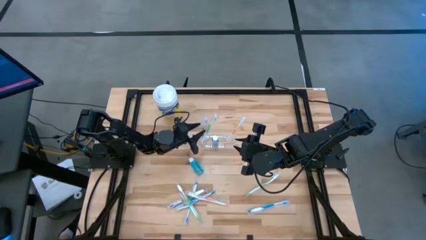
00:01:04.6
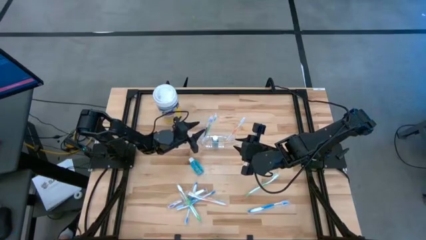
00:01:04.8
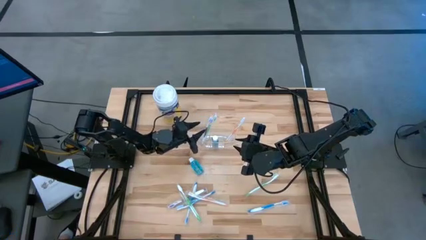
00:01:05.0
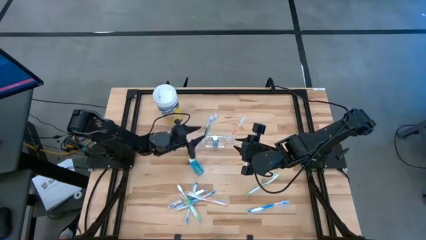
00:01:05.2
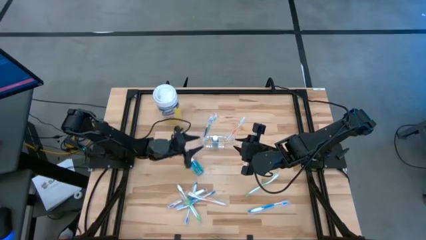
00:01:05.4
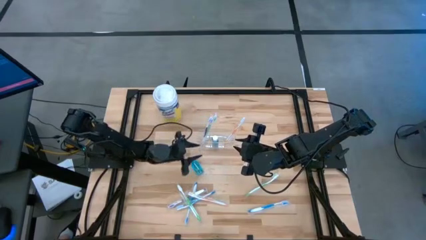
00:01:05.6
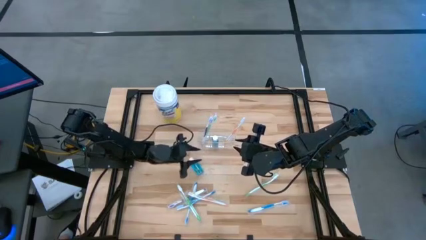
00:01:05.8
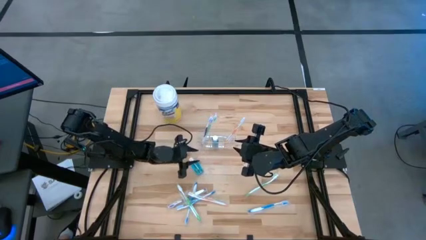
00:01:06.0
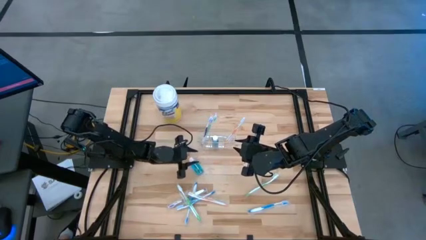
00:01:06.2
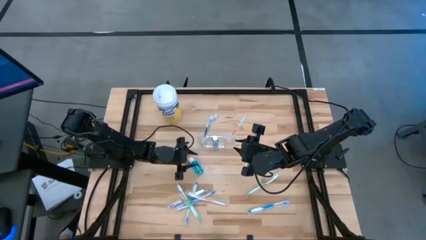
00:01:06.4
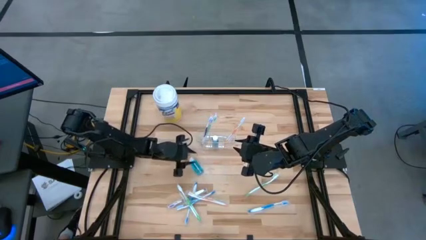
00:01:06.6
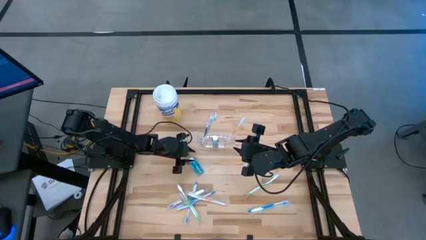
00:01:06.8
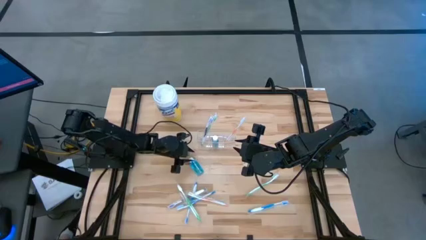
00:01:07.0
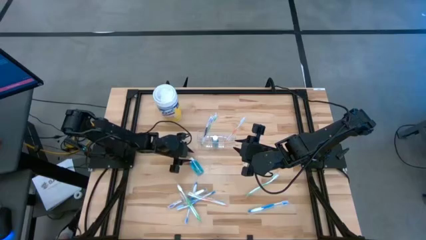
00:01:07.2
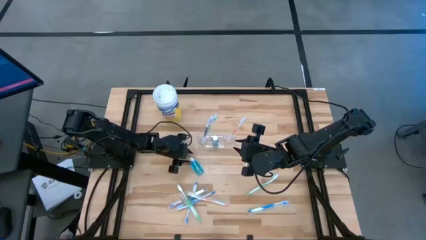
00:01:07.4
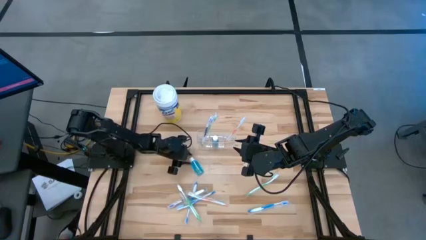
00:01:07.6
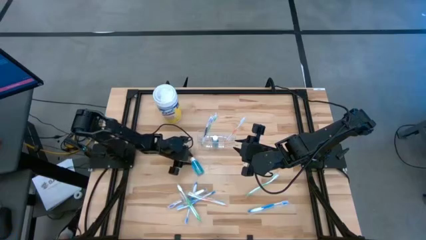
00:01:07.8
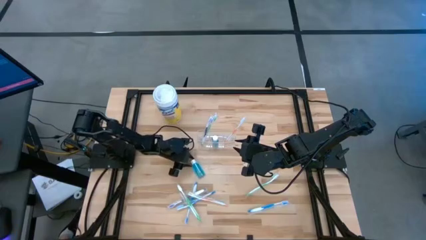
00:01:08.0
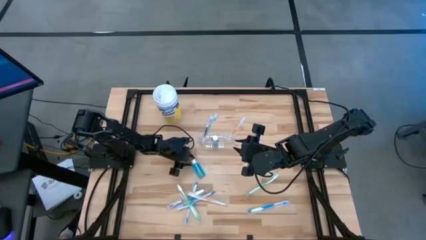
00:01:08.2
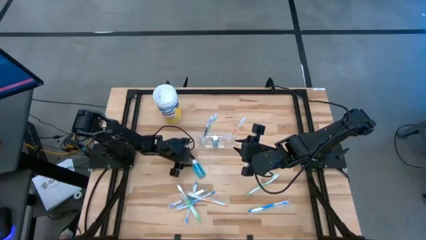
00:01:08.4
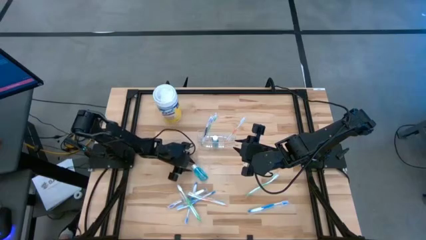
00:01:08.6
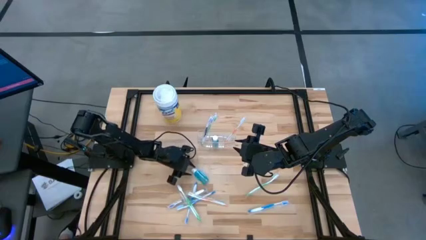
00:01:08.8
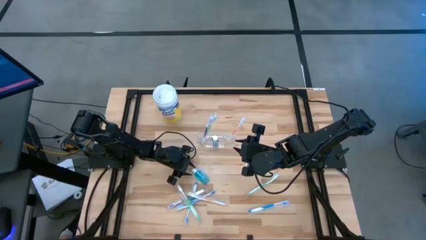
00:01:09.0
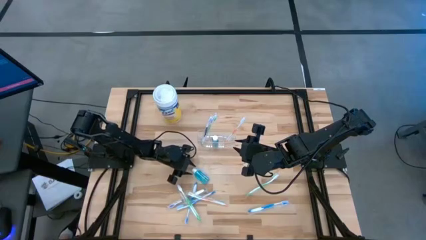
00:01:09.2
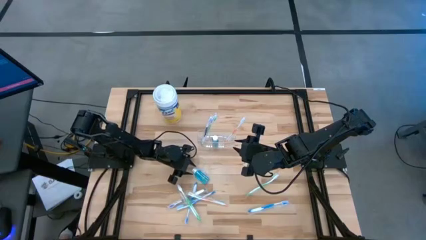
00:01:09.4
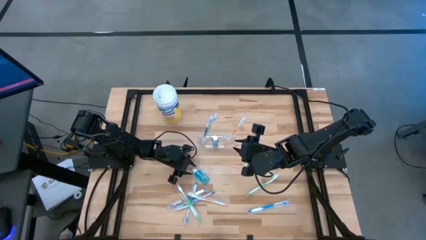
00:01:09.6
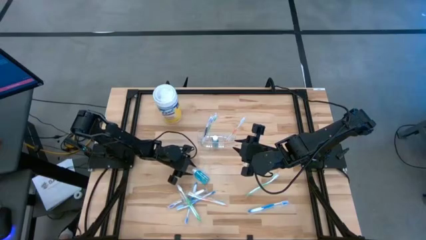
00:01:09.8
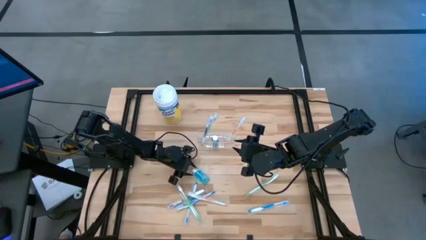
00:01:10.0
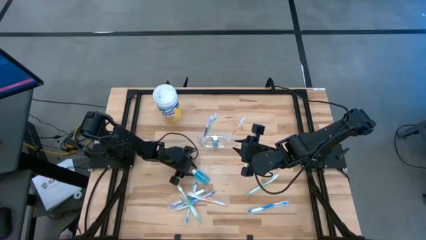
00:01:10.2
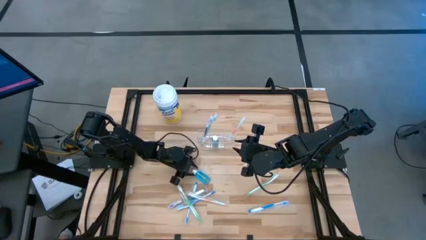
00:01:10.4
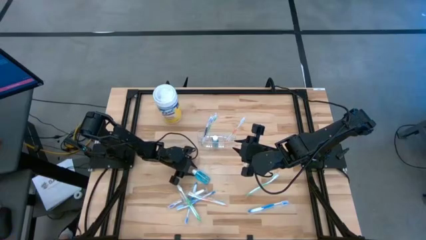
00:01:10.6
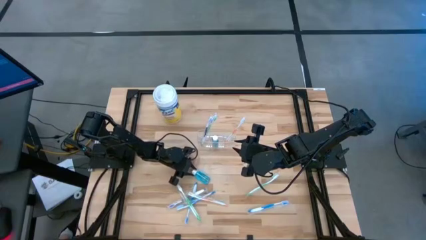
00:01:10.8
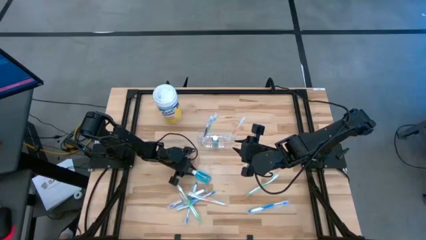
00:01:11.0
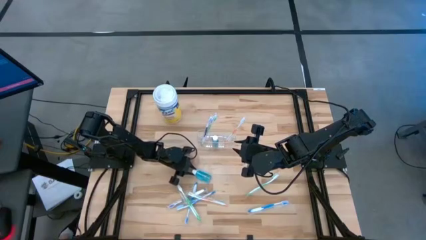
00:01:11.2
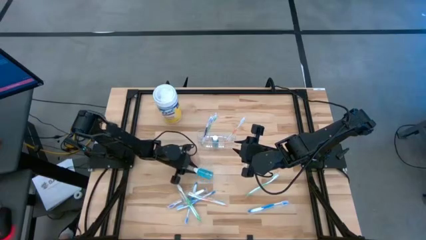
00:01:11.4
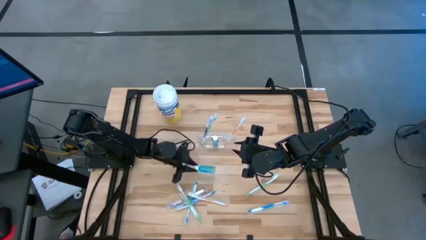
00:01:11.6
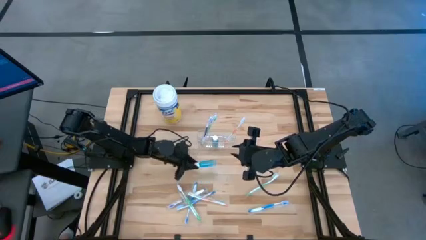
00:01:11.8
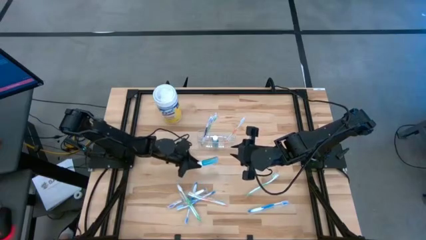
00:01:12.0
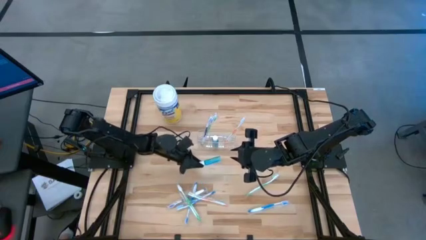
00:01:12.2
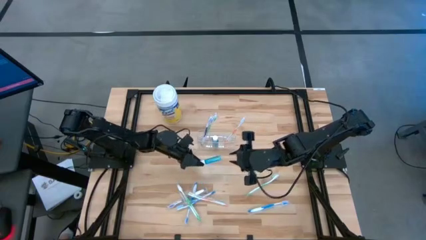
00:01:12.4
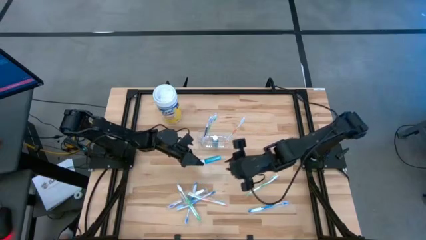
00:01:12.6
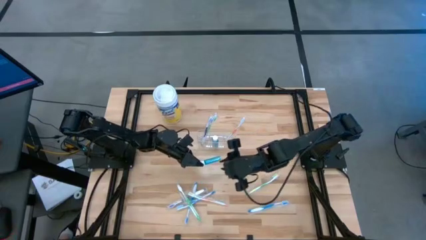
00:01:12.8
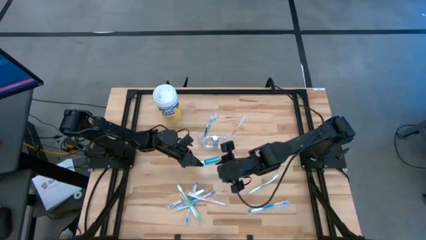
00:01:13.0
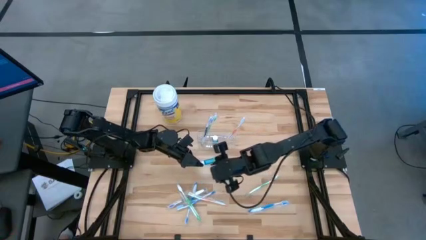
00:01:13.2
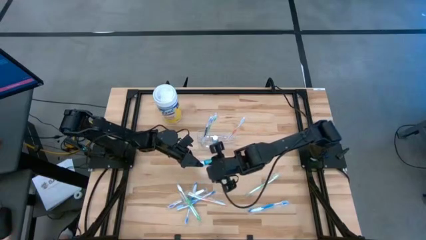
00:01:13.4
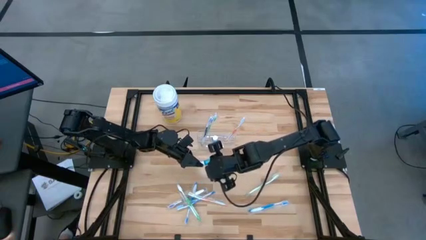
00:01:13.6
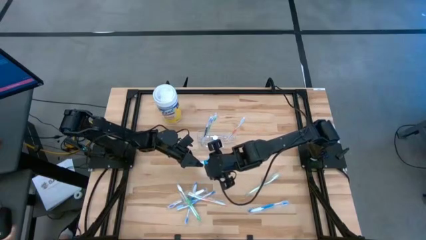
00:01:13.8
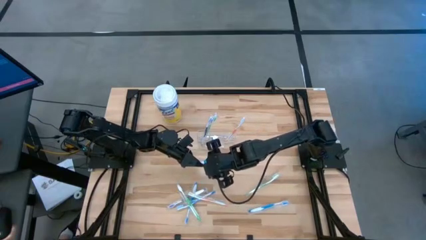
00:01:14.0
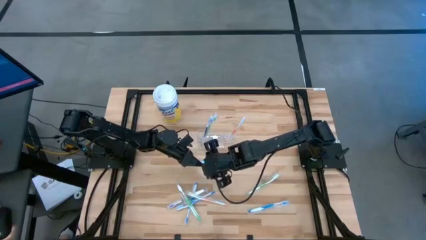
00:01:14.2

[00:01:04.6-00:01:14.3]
Task: Pick & Place toothbrushing station
Put the blue mouthwash into the transparent organizer

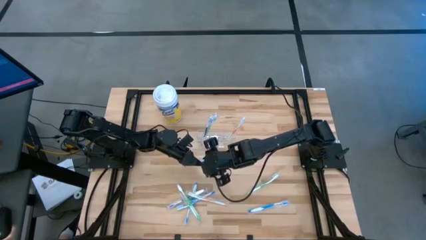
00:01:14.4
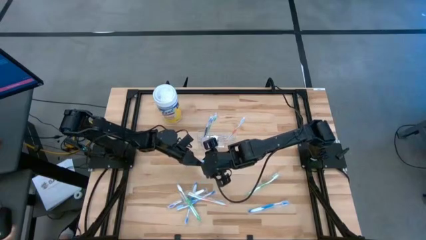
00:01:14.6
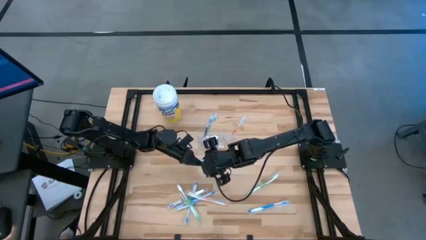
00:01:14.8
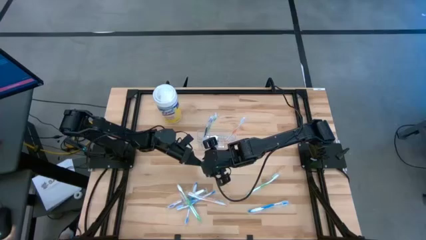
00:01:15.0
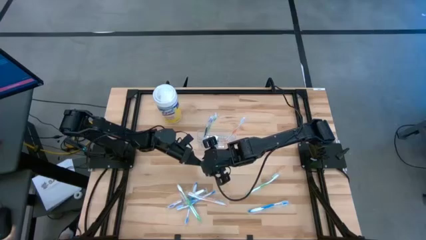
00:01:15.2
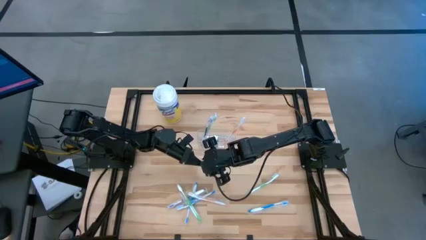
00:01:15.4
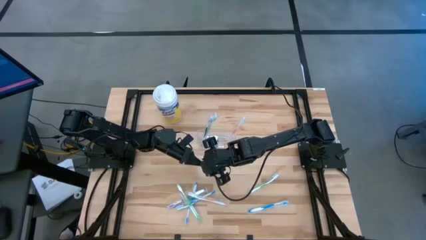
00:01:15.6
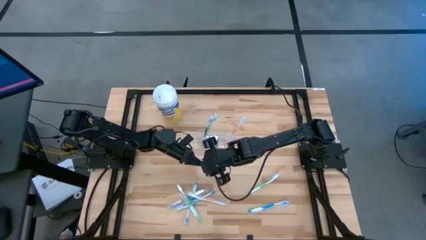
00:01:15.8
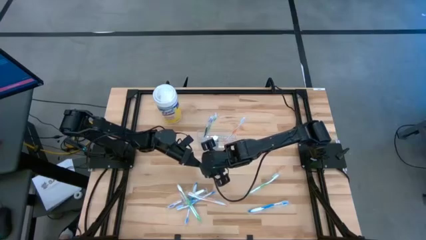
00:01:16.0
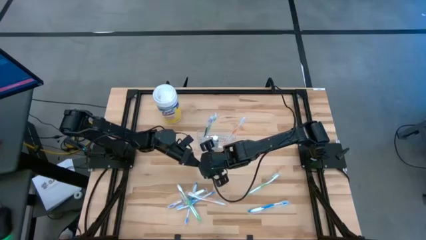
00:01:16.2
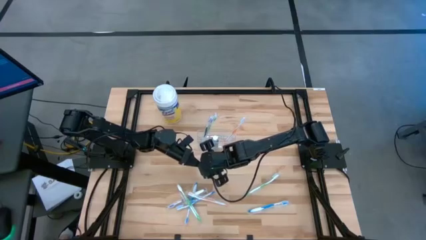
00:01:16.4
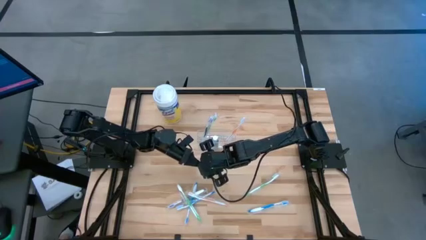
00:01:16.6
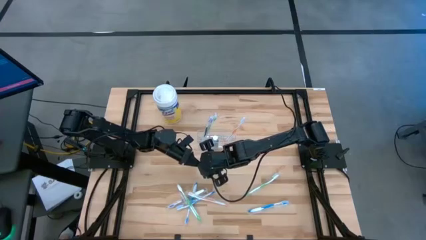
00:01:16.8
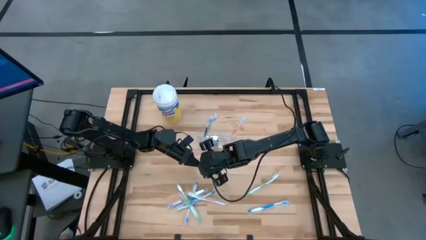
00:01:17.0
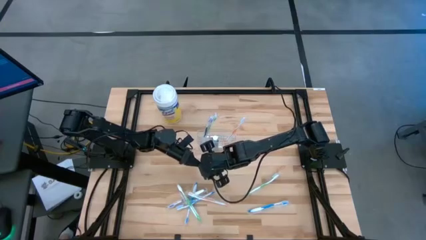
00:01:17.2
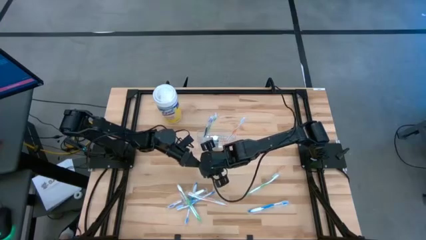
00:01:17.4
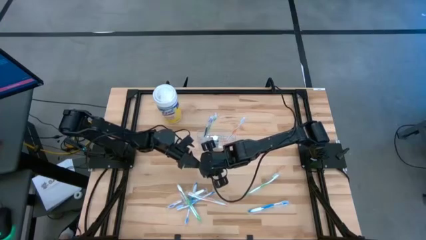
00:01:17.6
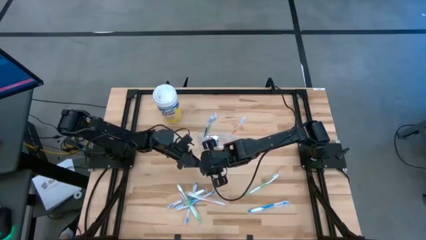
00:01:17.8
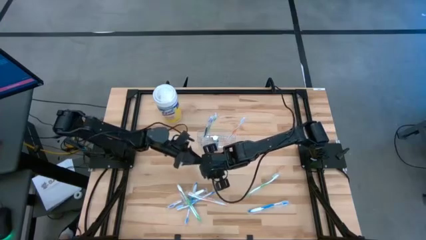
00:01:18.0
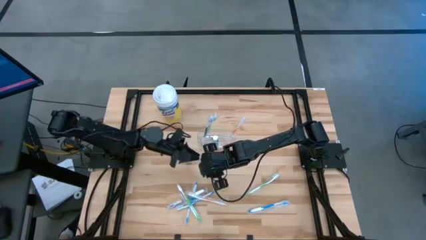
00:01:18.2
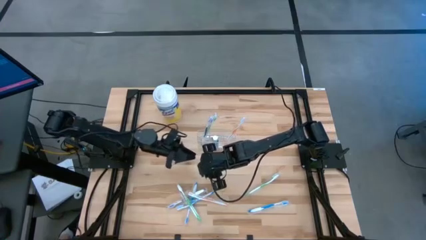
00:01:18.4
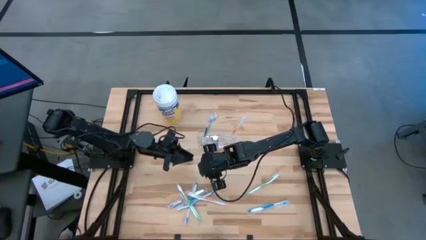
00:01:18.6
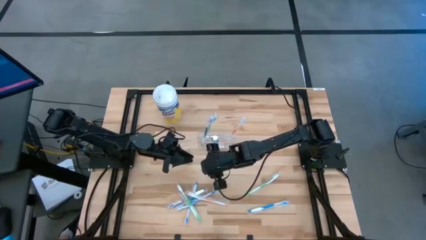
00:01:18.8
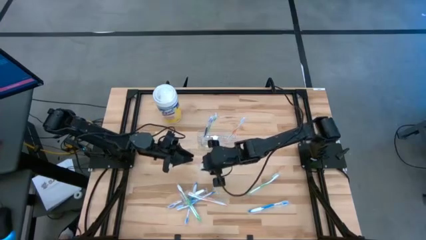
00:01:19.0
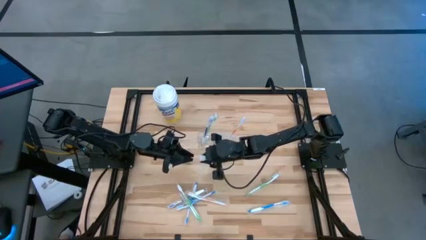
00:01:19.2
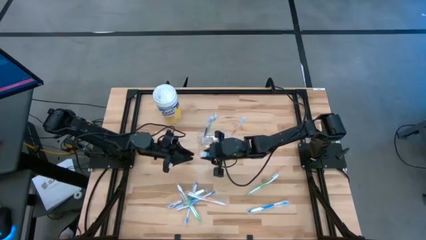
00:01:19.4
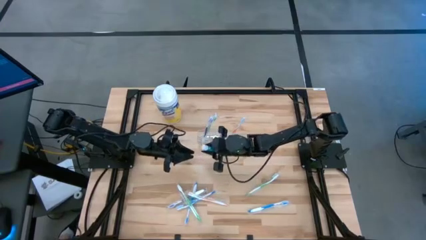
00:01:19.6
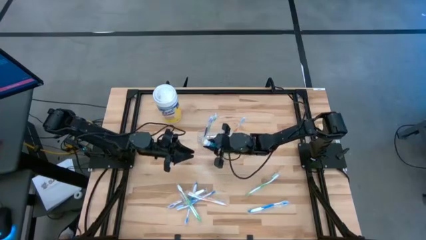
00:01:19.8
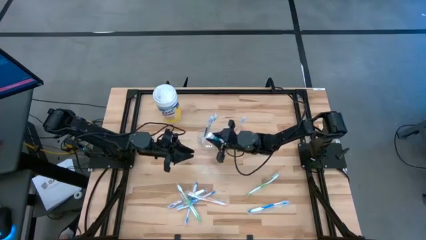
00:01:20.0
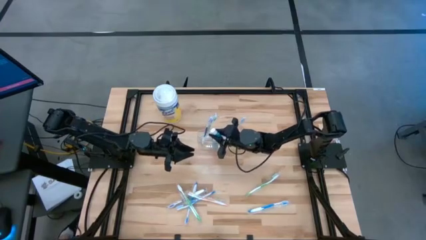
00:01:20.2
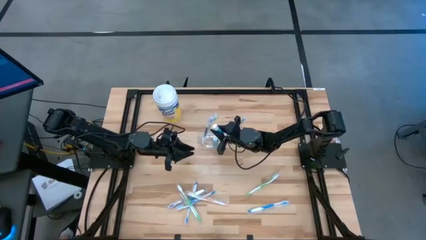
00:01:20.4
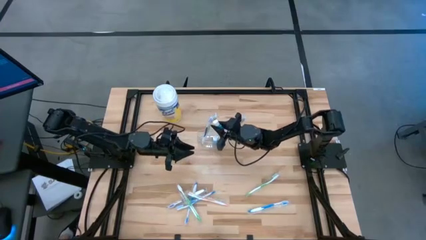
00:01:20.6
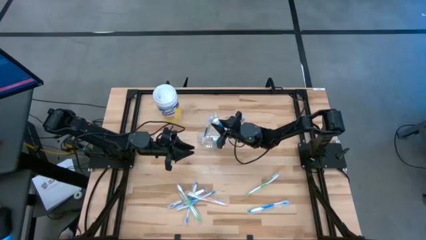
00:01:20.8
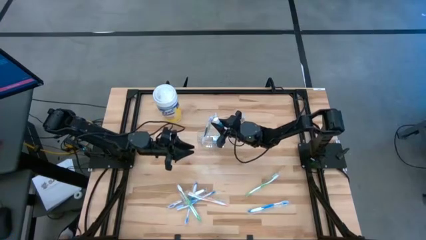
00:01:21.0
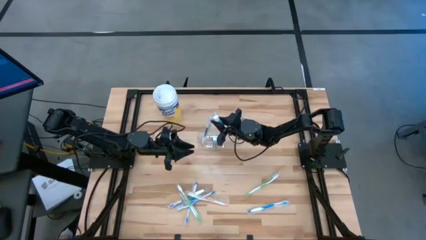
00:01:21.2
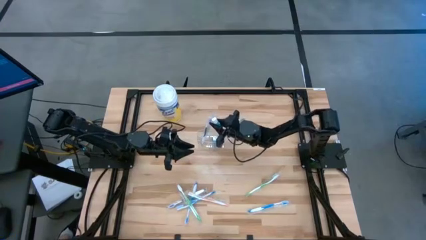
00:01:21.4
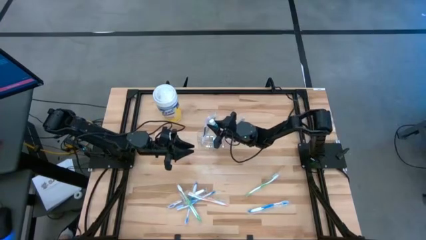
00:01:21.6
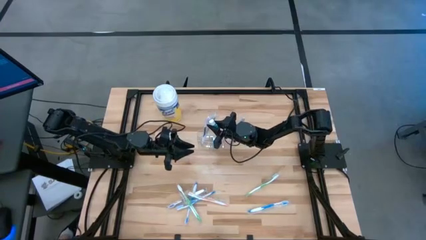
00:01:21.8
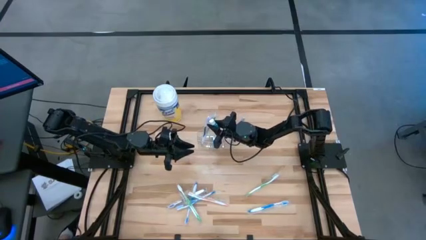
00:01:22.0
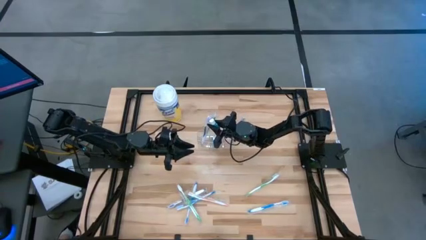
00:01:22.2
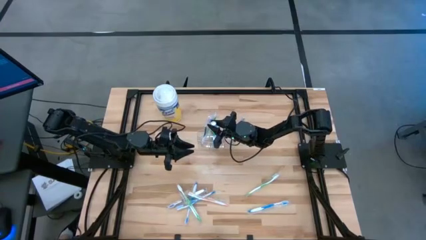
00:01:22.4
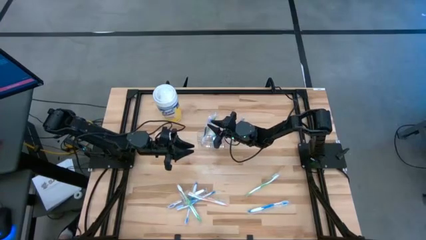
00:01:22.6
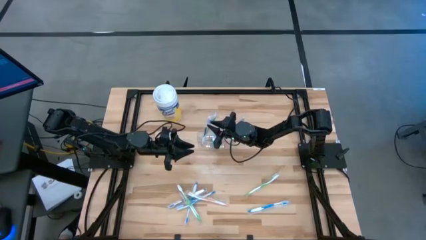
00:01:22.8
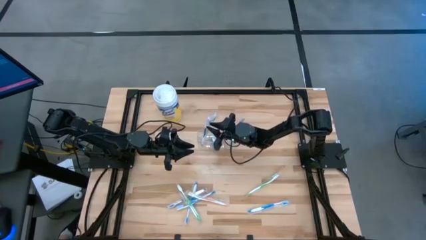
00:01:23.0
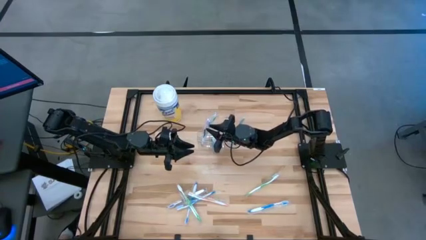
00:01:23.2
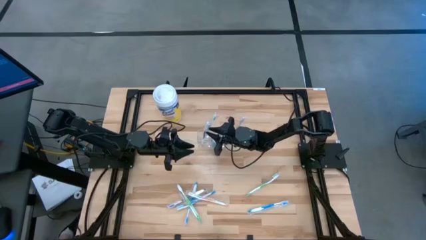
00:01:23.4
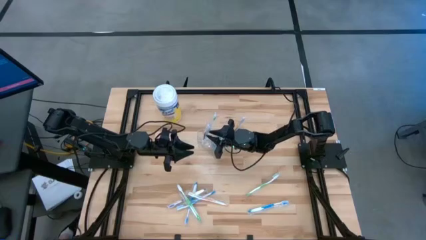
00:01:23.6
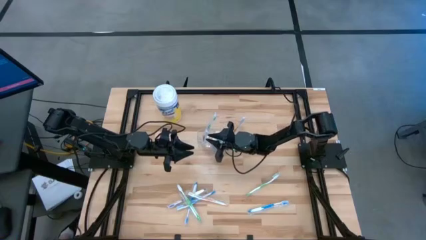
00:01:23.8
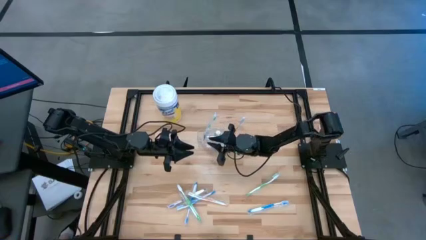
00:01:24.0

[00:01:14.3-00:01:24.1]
Put the blue mouthwash into the transparent organizer
